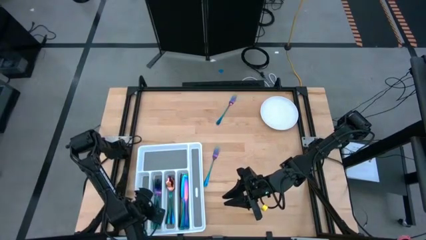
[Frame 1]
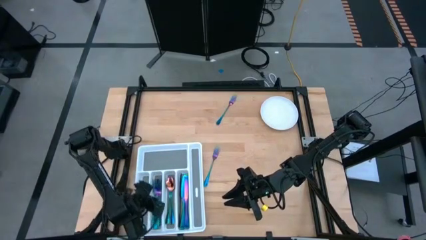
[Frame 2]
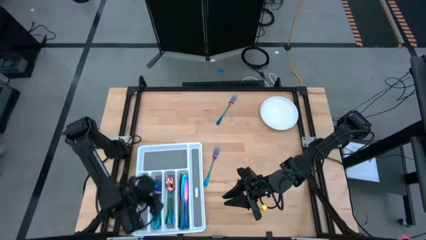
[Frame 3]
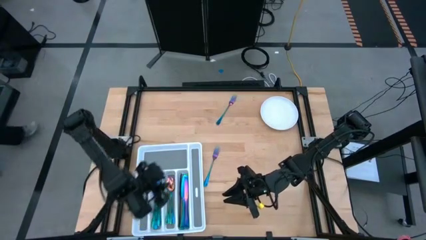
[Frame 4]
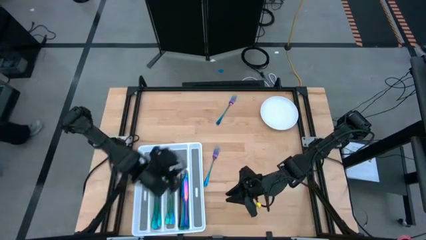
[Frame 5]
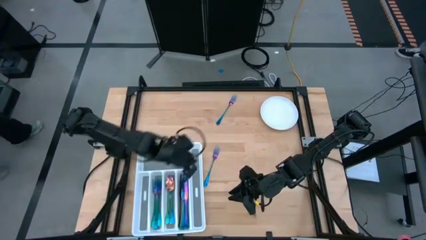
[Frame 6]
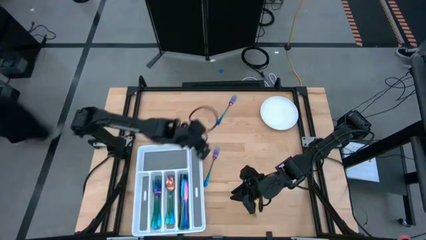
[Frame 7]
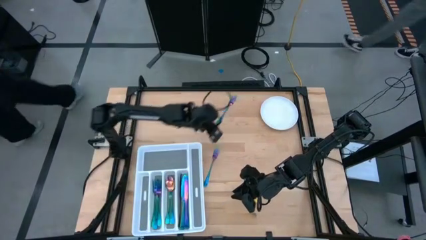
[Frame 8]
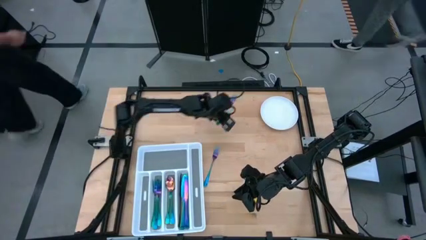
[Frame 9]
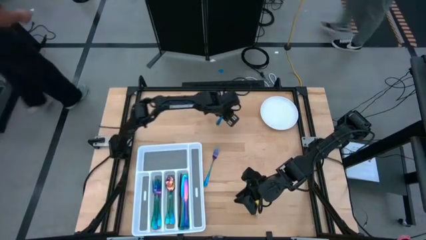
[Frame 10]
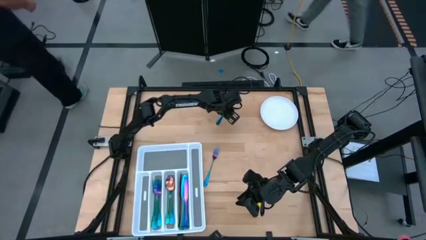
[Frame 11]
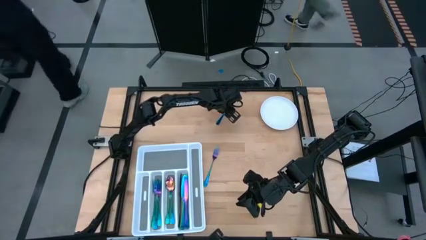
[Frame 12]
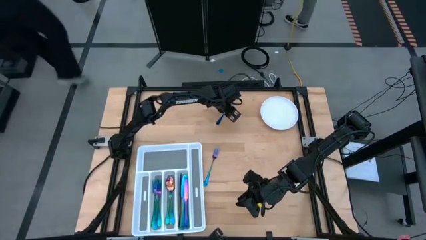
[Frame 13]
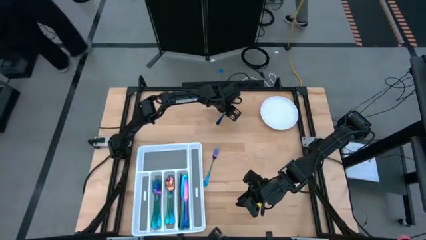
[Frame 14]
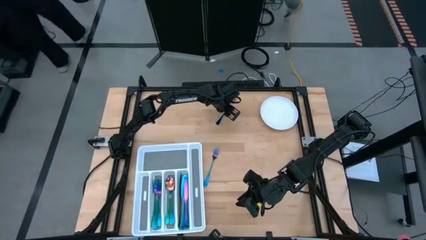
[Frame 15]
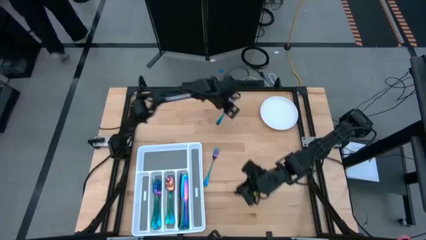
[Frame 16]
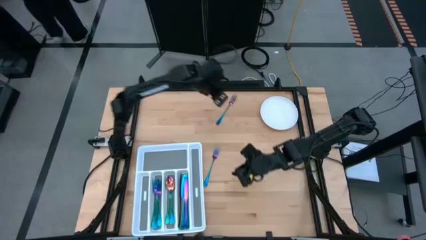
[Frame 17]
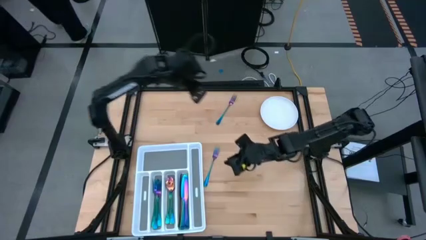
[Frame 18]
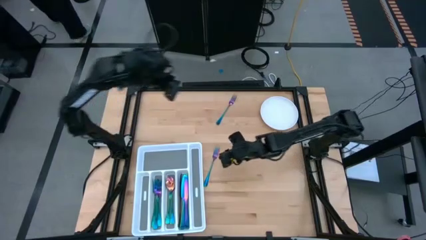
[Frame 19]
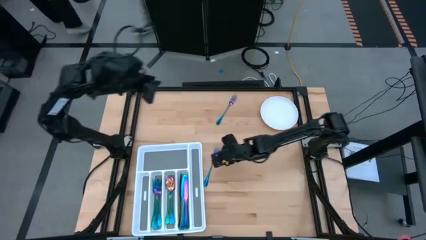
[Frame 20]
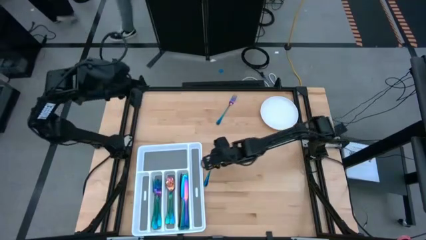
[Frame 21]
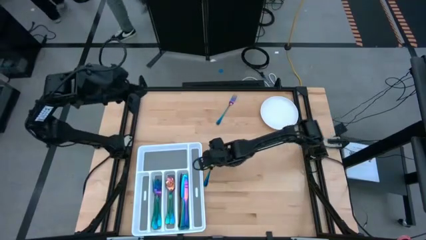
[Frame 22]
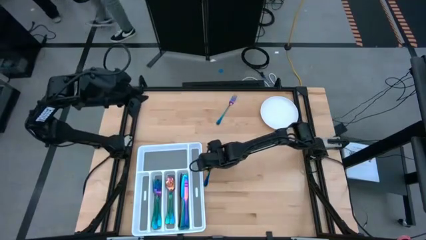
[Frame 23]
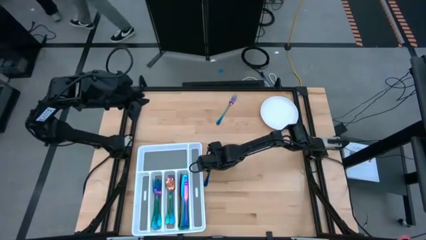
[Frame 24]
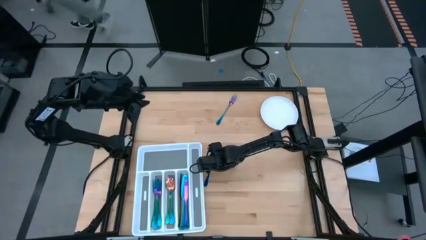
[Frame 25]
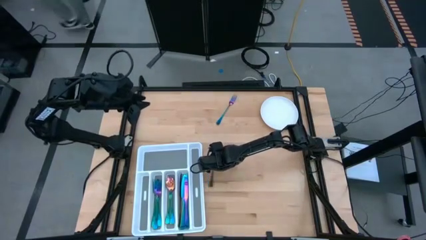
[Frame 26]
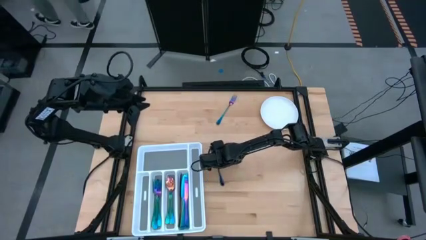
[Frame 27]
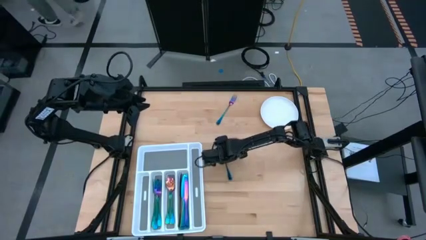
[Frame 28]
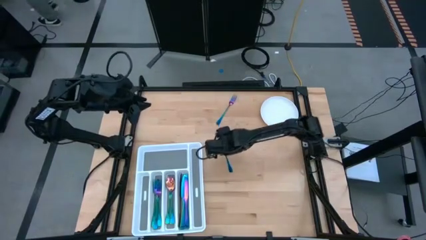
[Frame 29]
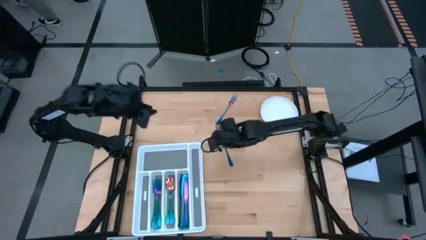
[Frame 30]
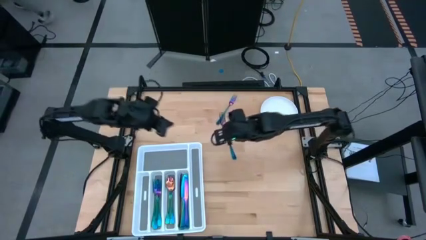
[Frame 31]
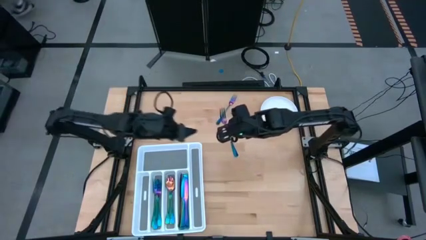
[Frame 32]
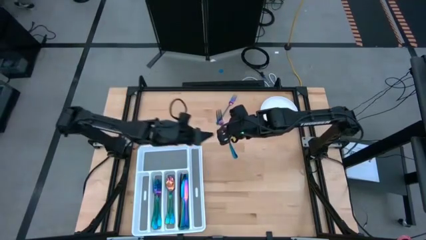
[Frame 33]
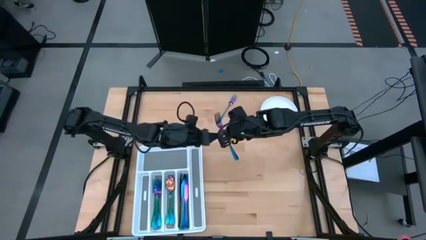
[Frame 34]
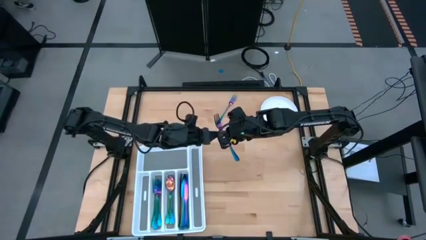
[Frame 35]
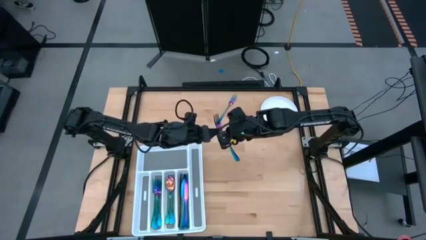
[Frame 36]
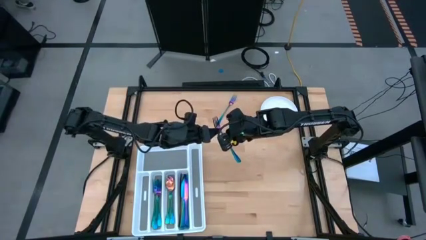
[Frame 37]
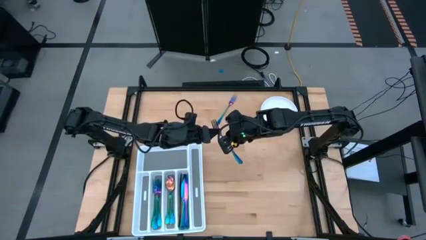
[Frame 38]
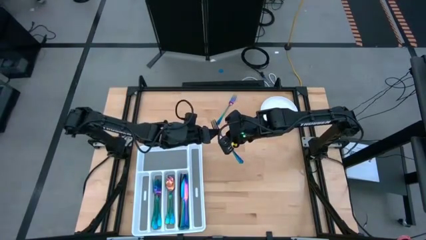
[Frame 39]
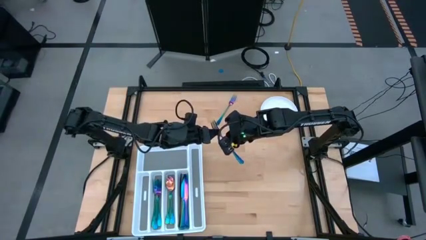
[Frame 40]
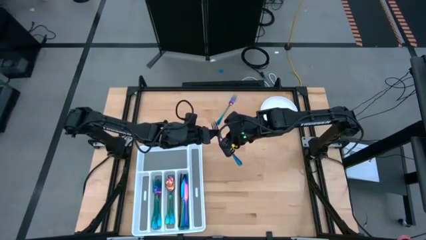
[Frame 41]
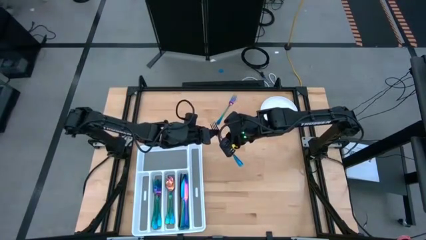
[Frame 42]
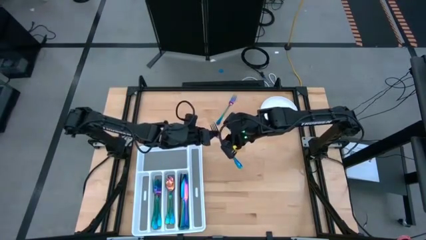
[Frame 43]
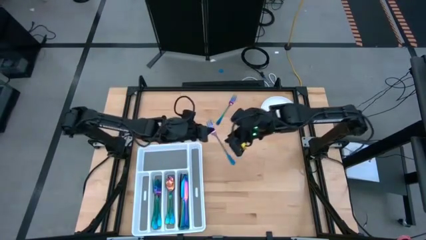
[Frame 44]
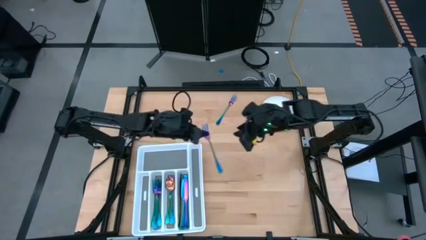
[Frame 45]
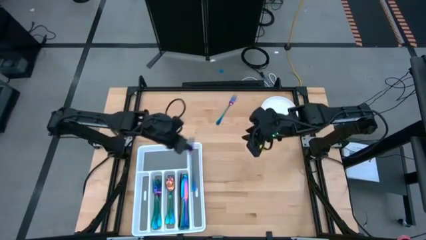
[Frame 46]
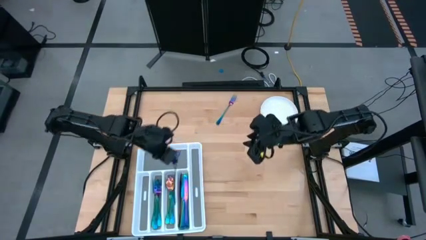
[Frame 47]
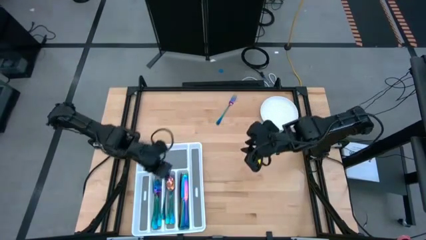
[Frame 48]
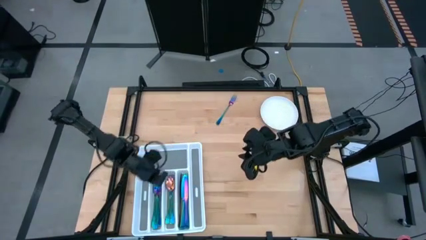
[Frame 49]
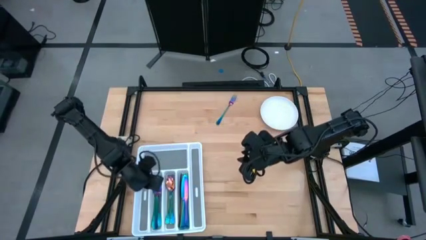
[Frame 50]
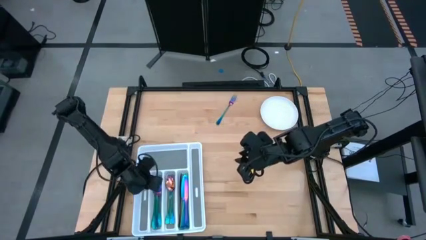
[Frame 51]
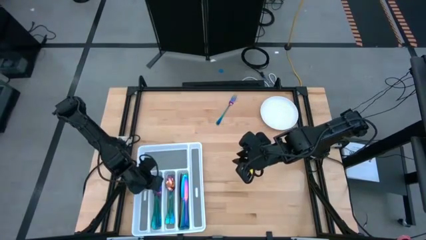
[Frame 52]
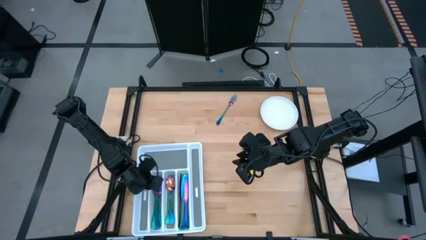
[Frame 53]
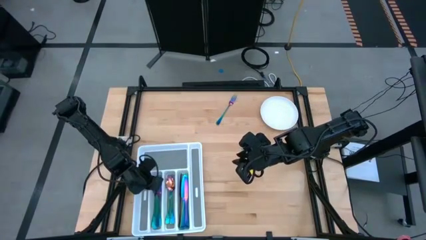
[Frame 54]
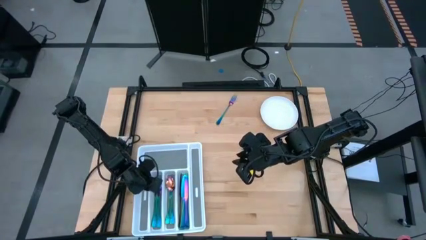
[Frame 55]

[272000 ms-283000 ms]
Task: Sort silverware
Put the bottom iridescent fork into the cutlery tray

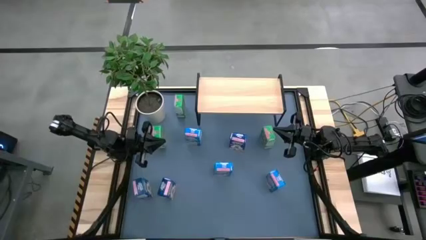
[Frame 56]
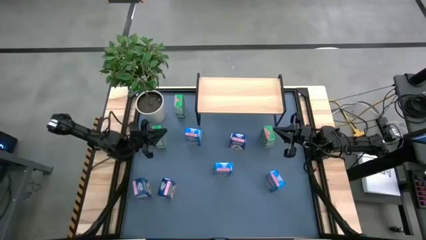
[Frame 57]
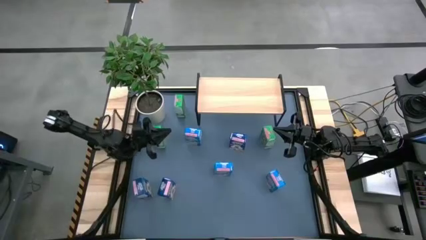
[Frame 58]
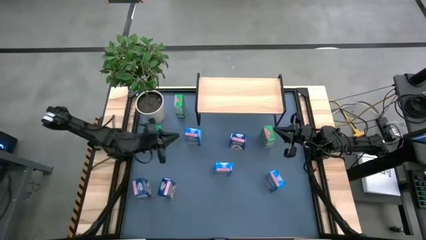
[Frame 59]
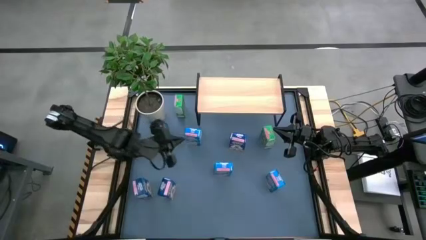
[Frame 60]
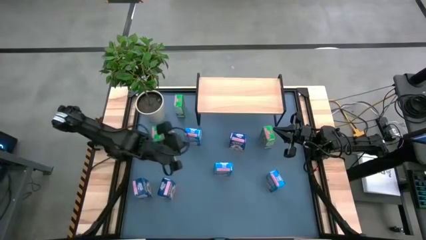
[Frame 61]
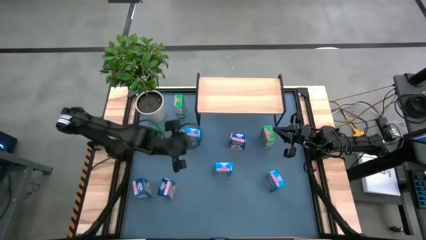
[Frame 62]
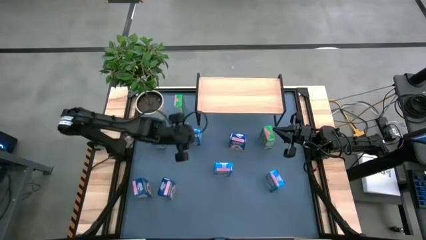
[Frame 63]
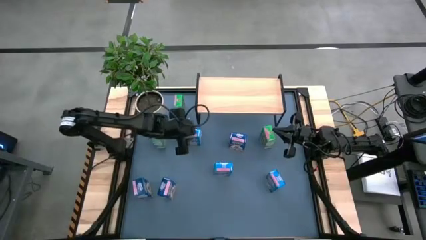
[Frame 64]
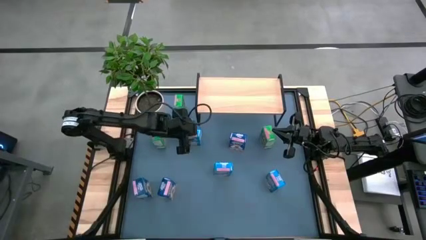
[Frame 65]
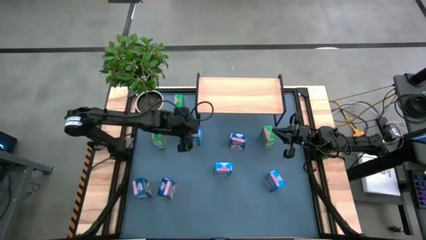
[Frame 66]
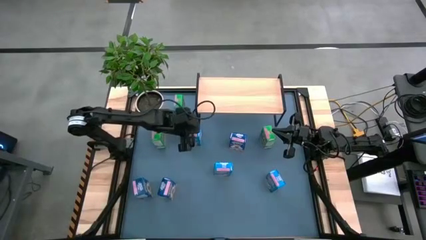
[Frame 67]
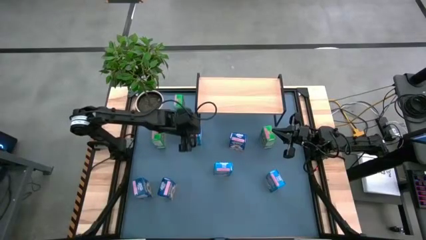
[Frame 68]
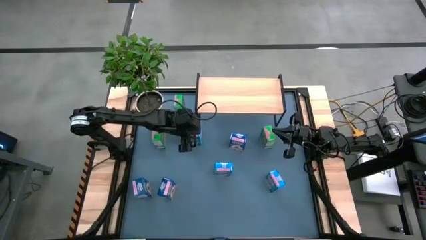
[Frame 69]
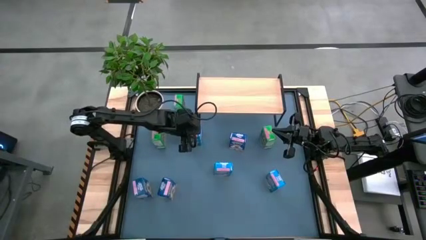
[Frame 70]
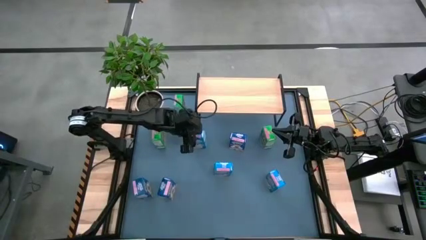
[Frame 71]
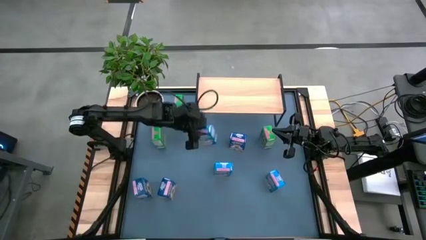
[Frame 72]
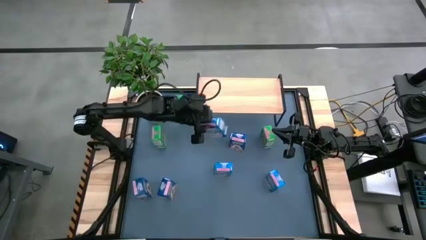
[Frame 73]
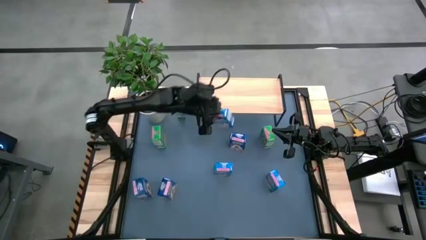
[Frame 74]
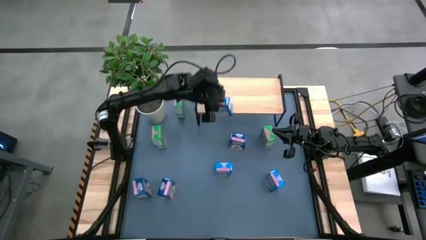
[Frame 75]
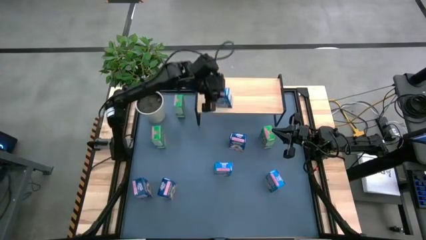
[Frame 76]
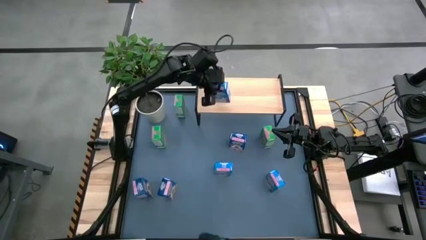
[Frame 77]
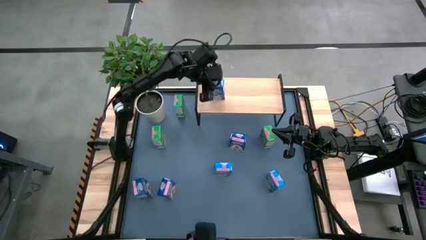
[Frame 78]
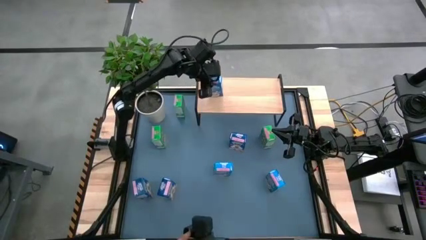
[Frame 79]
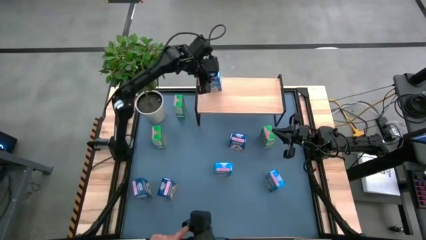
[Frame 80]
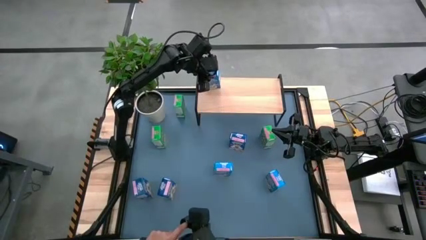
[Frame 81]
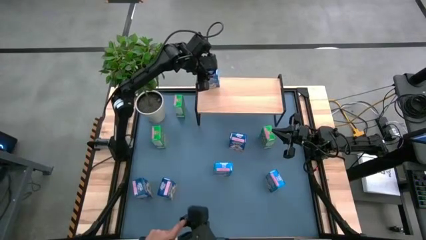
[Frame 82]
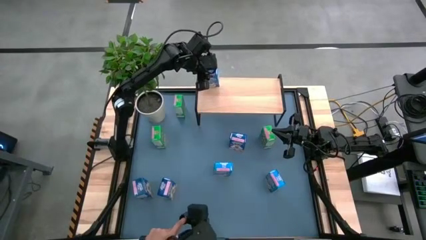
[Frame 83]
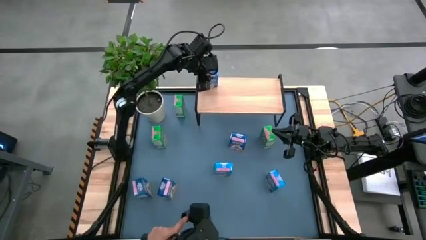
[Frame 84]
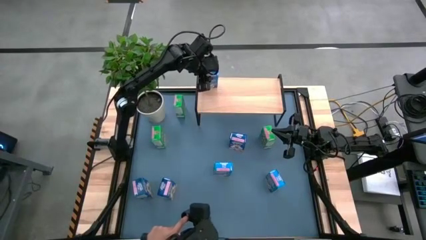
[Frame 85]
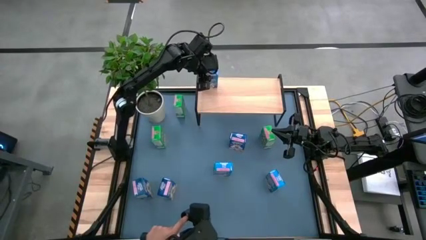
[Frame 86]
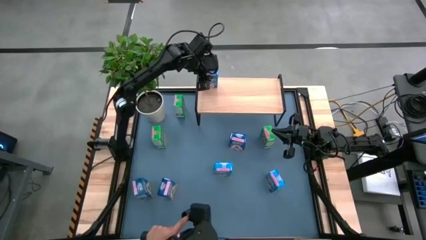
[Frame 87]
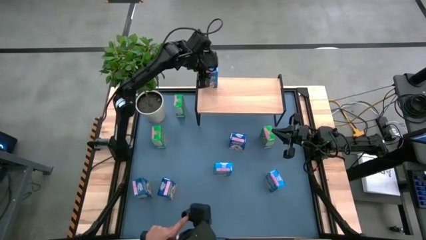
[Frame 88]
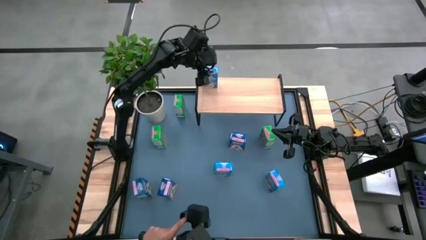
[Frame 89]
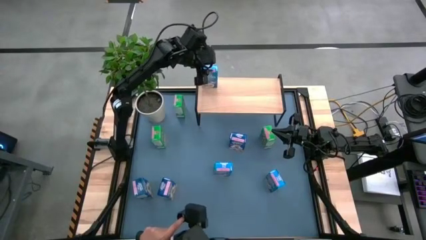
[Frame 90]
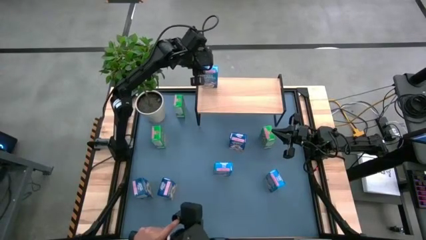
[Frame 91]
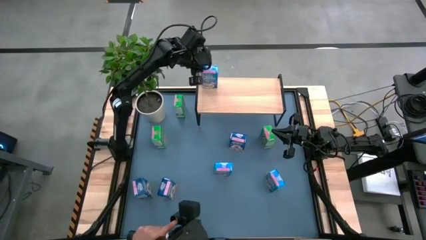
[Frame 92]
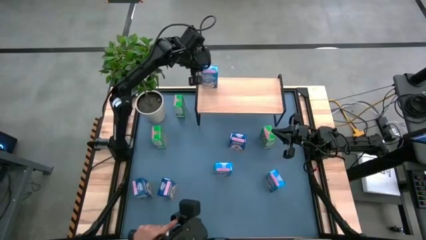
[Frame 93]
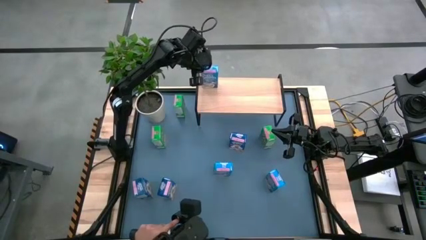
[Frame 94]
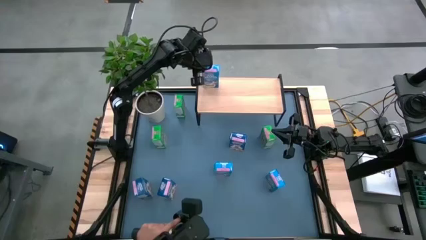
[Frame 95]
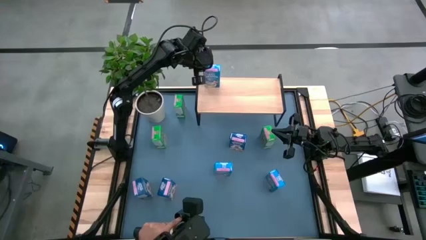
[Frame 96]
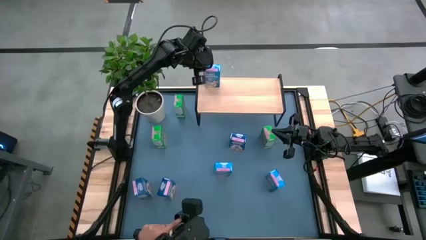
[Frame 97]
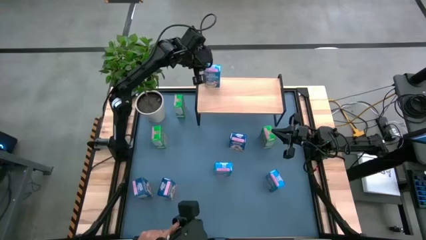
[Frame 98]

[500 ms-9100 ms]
Task: Stack cereal on shelf
Put the top light blue cereal box on the shelf
